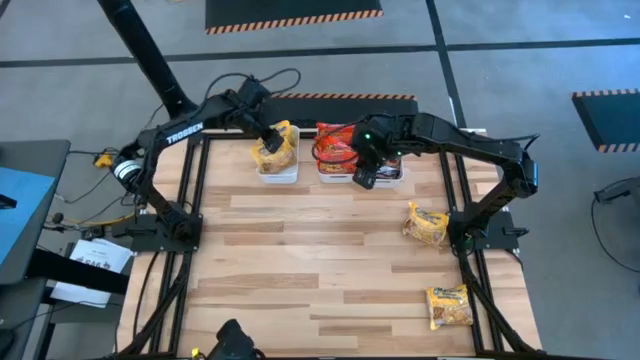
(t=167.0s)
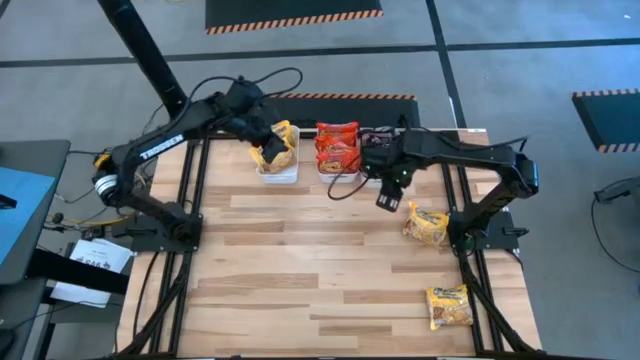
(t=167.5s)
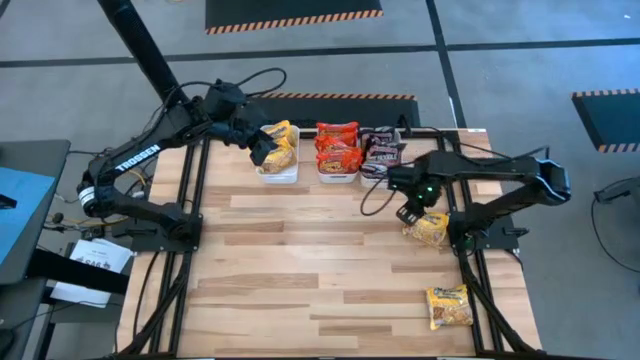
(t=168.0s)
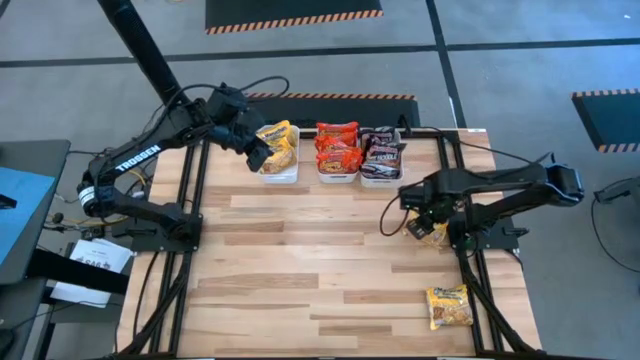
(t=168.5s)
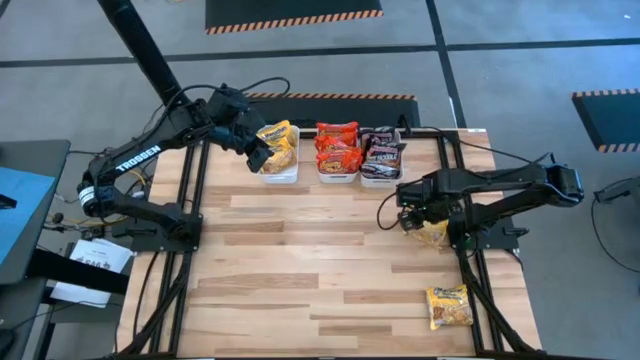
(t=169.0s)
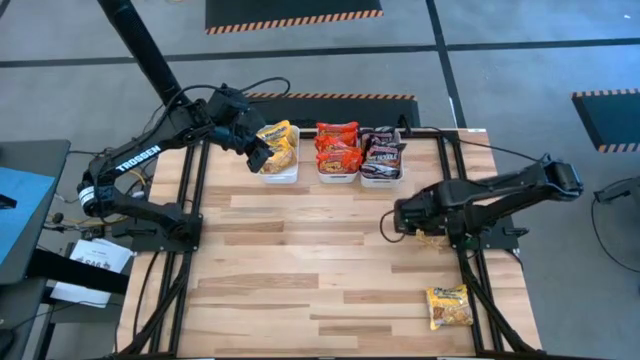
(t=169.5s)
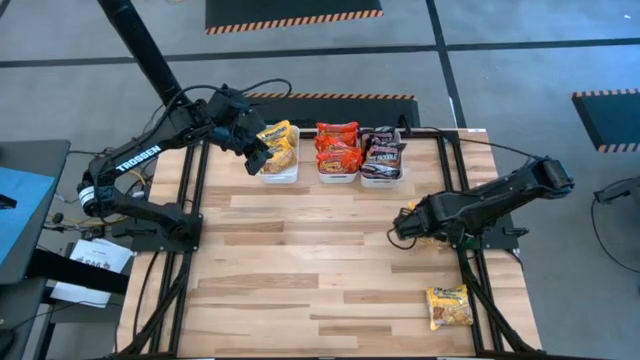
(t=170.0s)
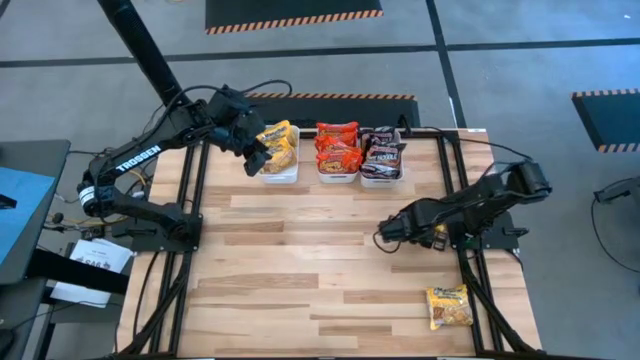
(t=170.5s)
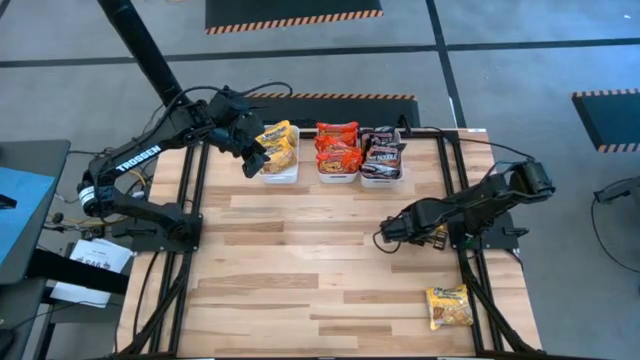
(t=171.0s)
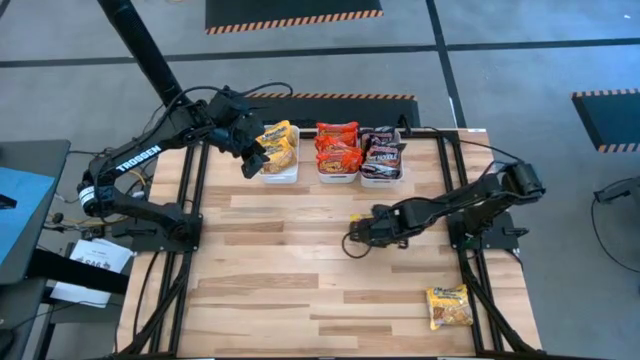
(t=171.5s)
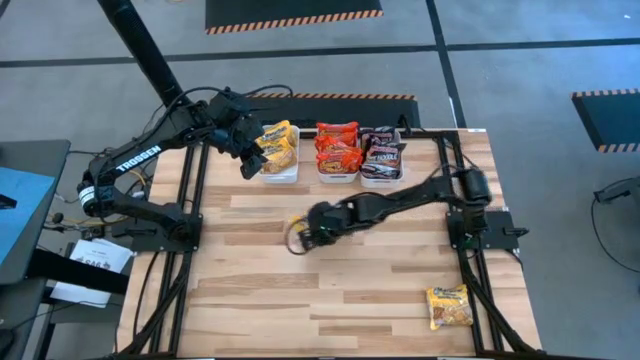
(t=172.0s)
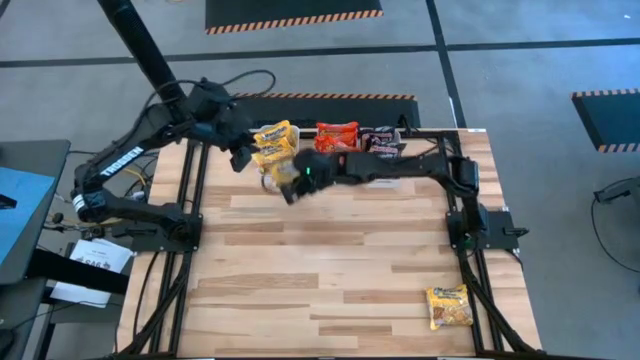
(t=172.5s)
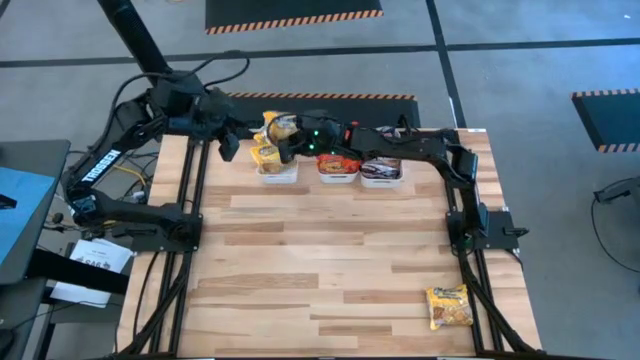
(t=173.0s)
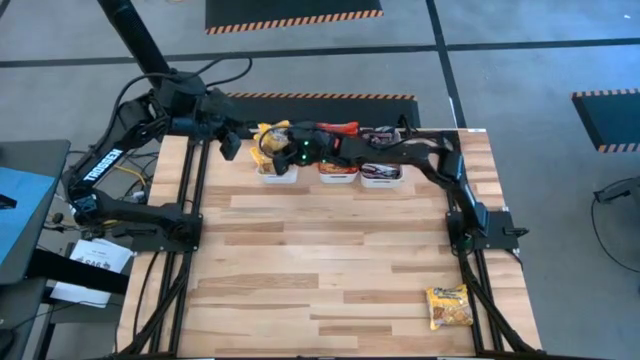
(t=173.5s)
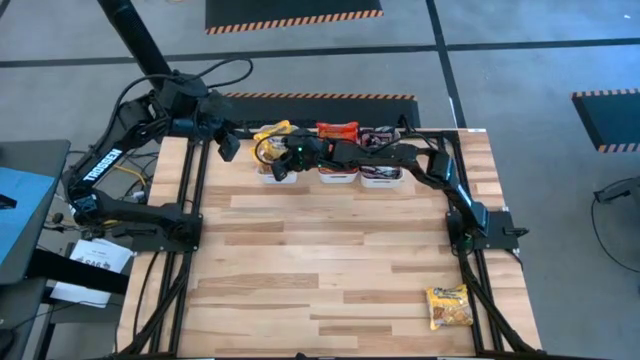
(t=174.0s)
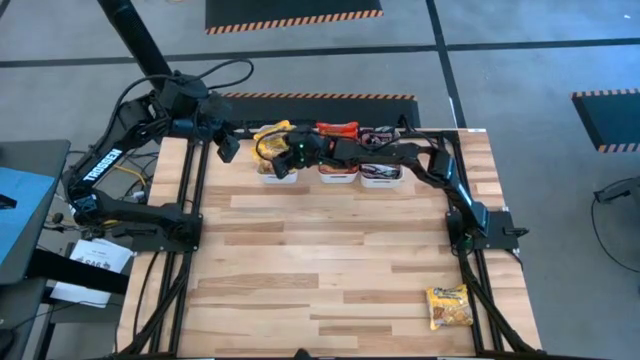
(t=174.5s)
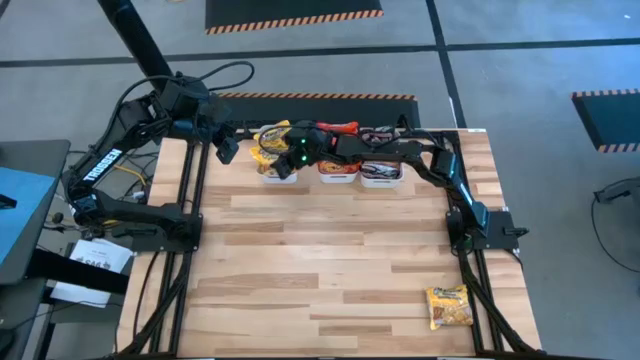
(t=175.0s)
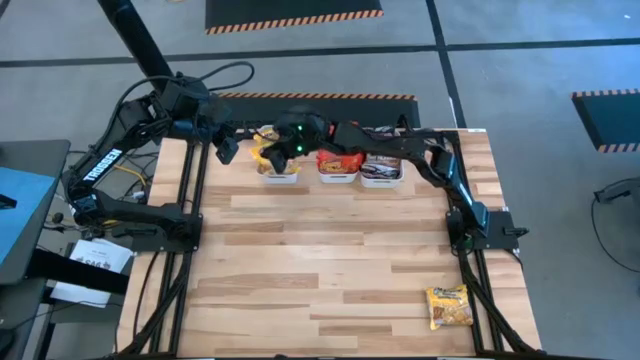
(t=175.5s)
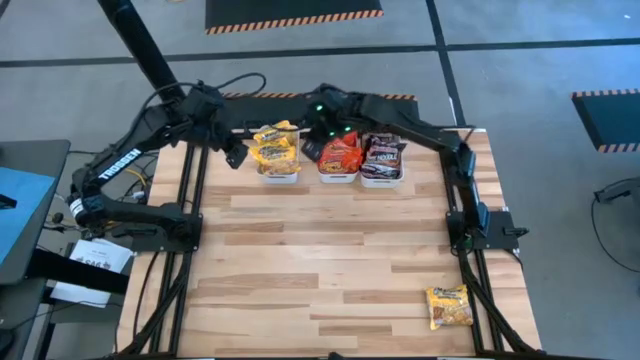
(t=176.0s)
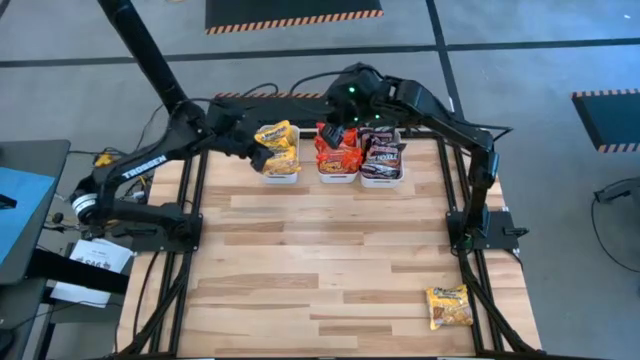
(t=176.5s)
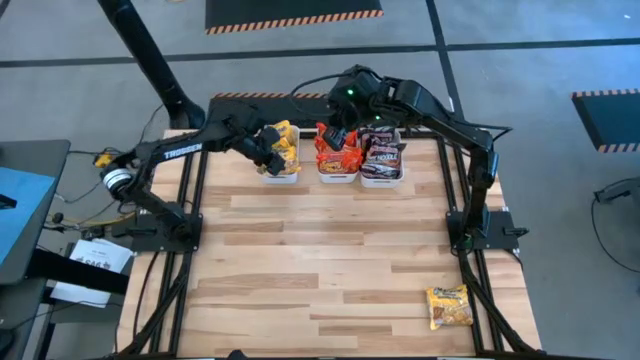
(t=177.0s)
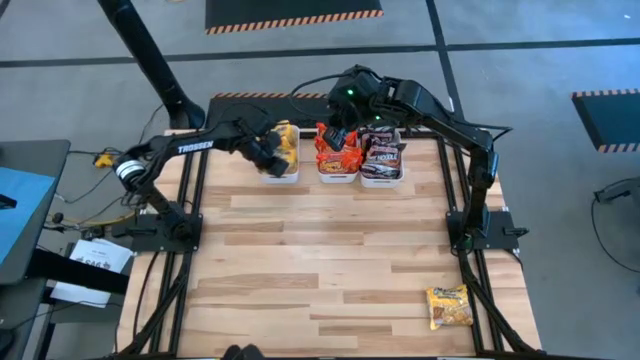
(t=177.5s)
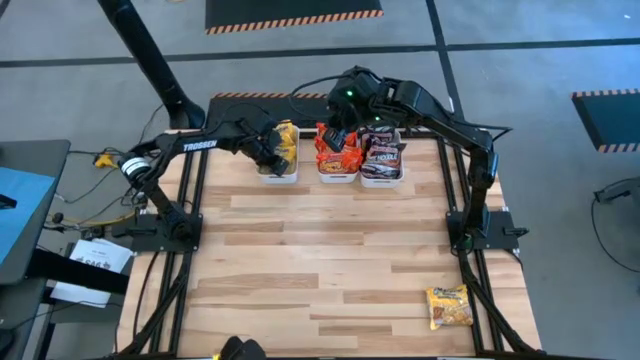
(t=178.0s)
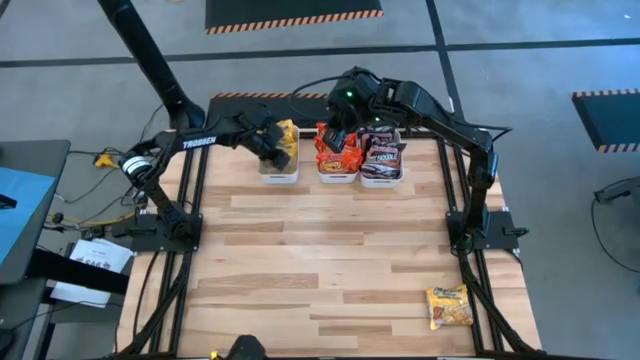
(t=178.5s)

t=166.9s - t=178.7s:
Task: Sort Maruchan noodles
Put the yellow noodle pack into the left white bin
